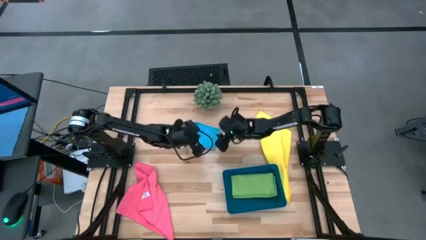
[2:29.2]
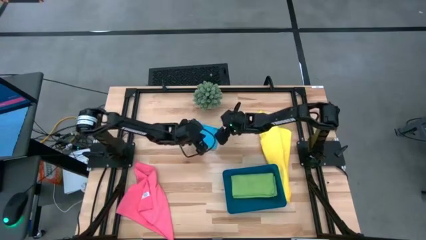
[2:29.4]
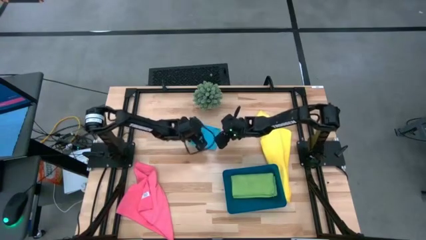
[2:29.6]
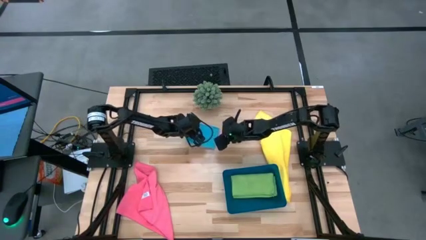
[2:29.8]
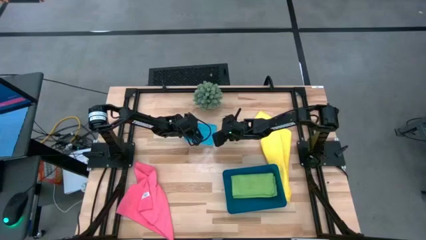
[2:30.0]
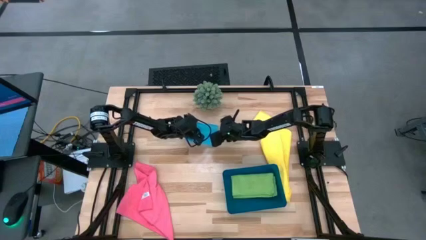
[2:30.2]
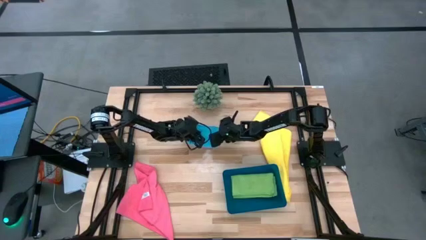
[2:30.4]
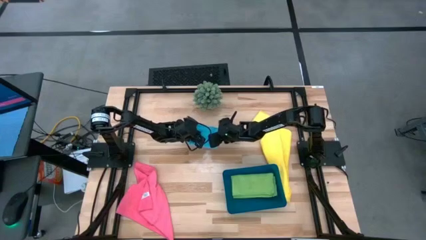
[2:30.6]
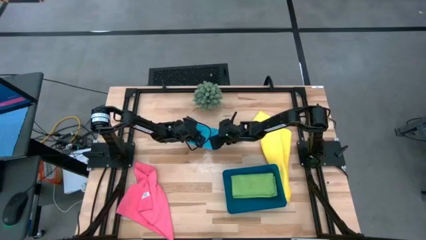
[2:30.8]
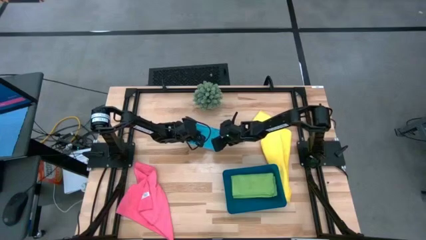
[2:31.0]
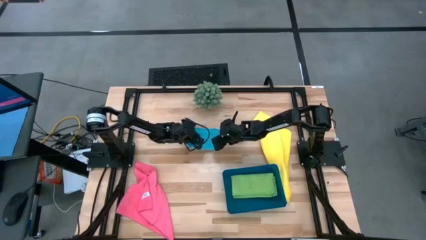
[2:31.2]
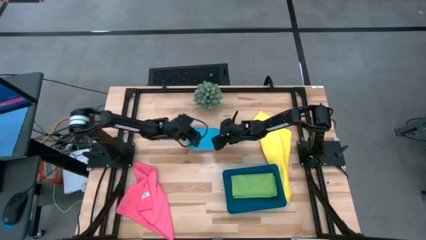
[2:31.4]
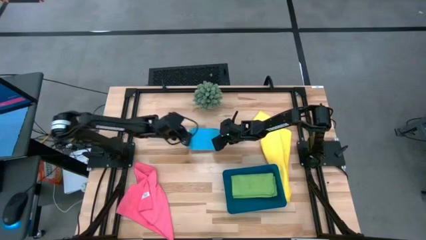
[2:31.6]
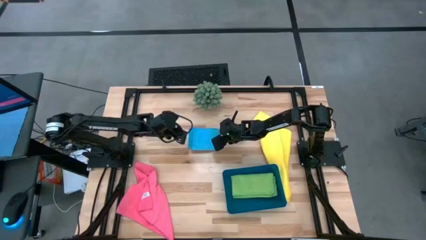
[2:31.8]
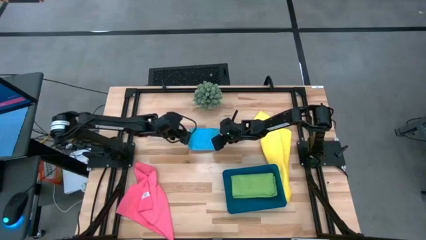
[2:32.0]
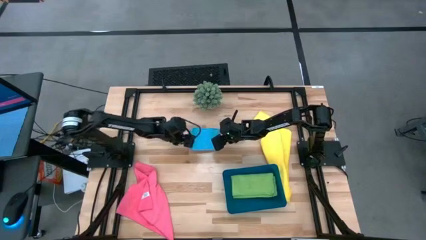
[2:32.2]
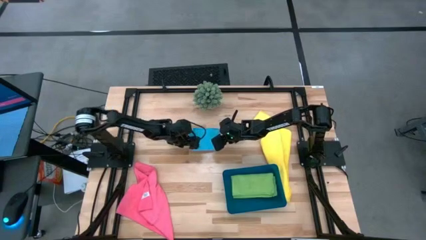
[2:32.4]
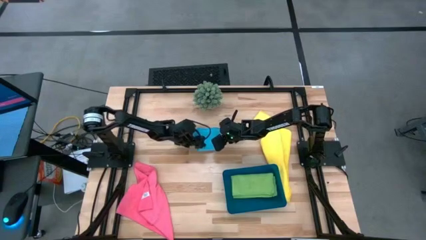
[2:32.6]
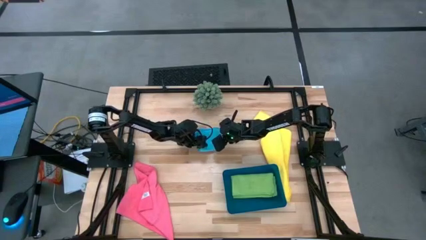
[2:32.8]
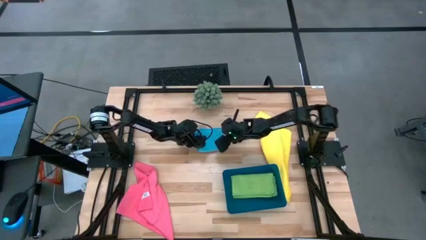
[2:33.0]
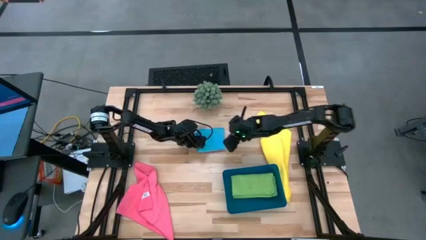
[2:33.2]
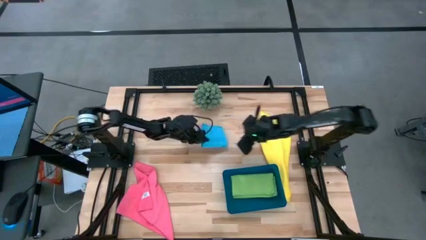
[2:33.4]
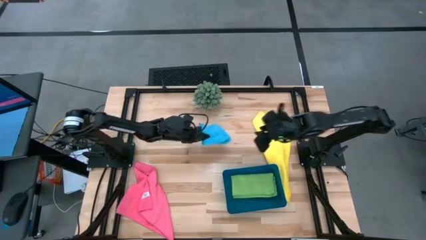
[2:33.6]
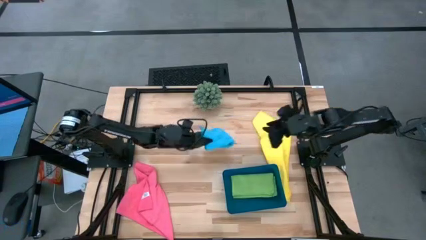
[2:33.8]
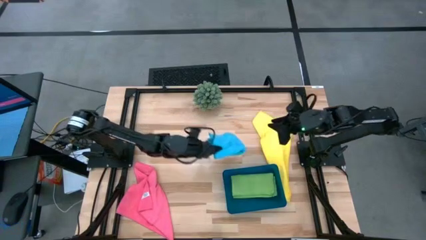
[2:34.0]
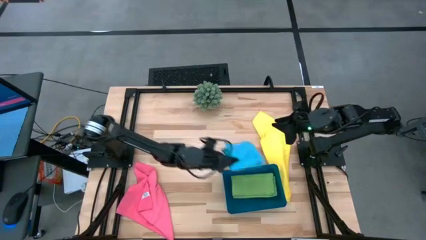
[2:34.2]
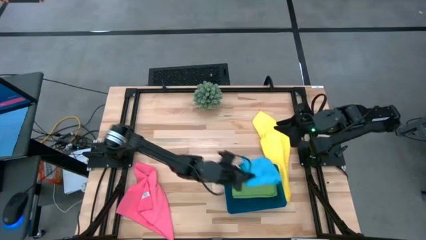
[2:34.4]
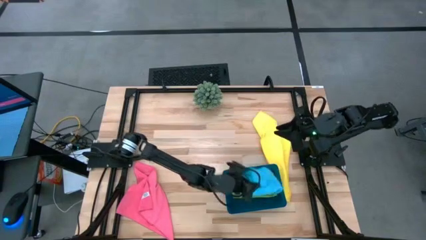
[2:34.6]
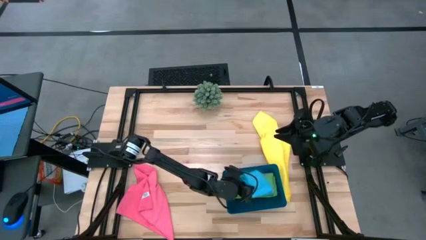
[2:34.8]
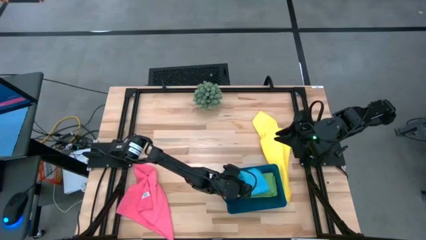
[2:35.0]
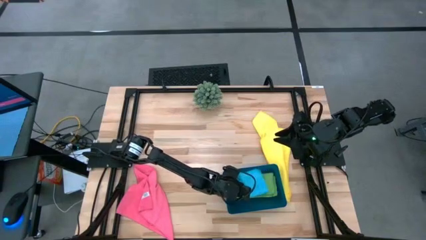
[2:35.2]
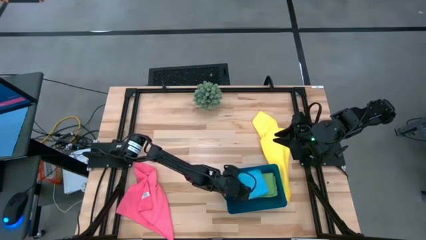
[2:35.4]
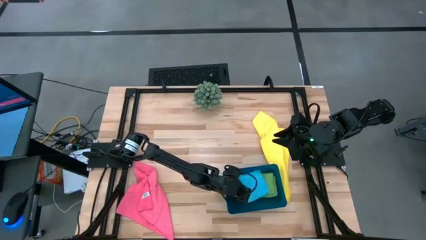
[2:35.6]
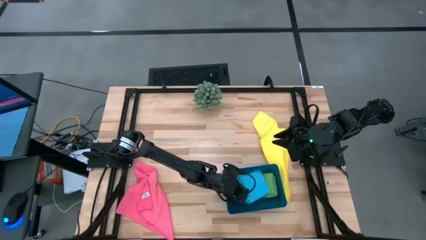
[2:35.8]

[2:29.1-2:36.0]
Task: Fold microfiber towels
Stack the folded blue microfiber cloth into the blue bin

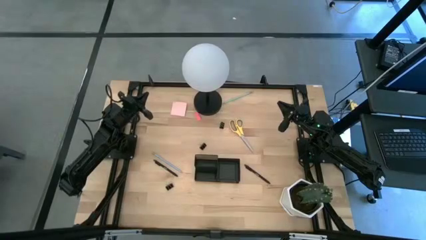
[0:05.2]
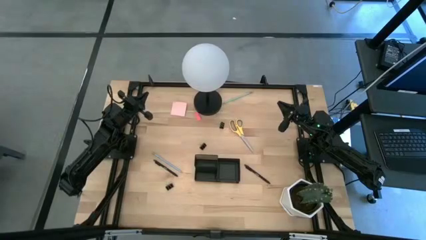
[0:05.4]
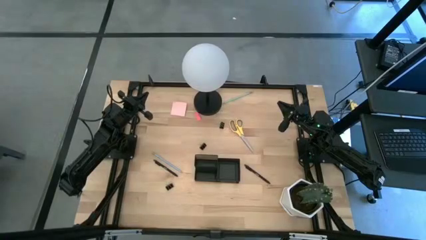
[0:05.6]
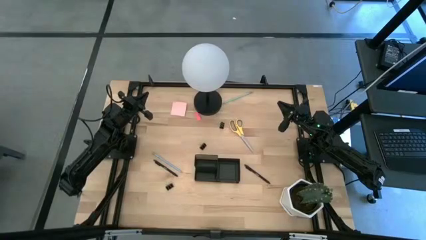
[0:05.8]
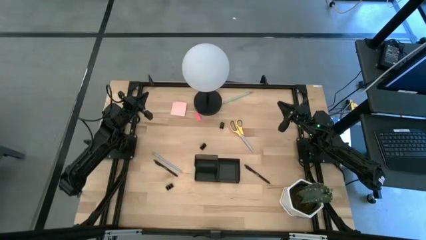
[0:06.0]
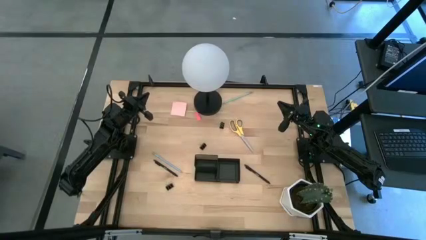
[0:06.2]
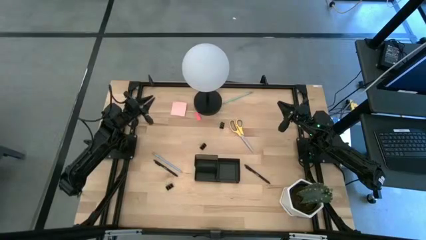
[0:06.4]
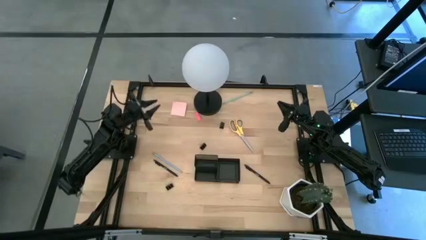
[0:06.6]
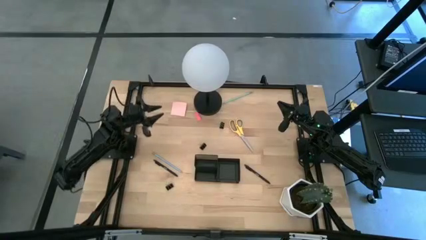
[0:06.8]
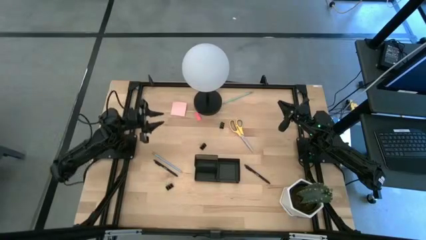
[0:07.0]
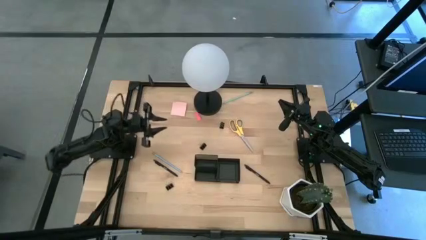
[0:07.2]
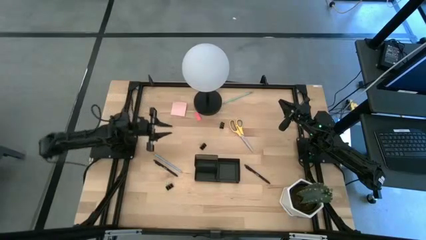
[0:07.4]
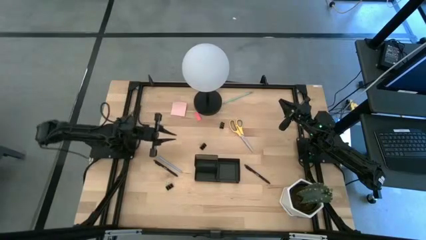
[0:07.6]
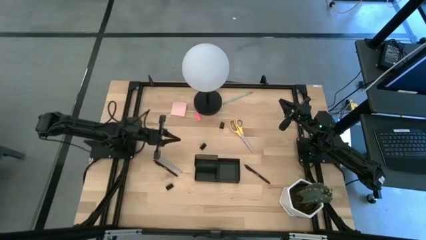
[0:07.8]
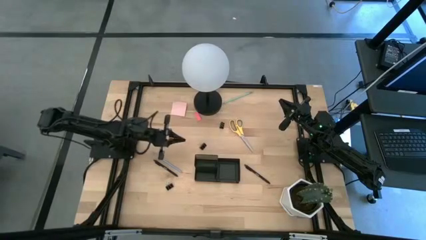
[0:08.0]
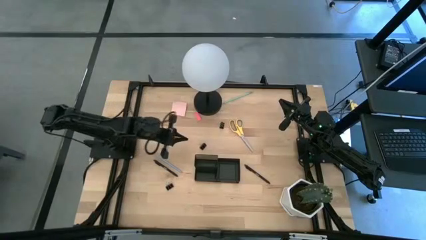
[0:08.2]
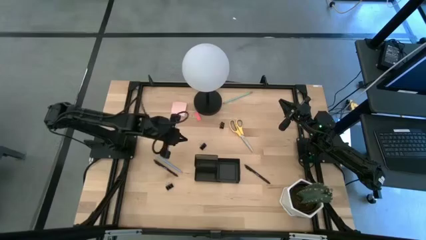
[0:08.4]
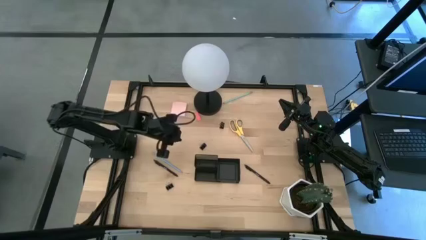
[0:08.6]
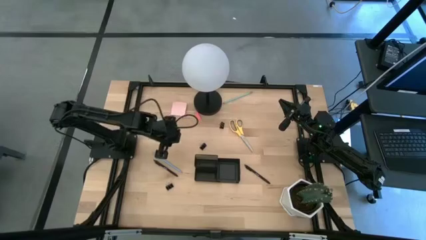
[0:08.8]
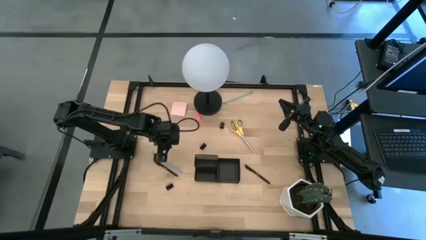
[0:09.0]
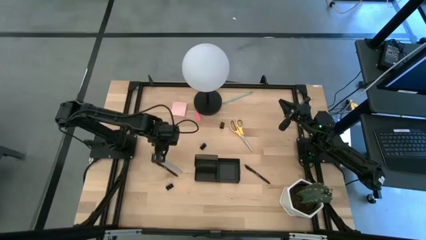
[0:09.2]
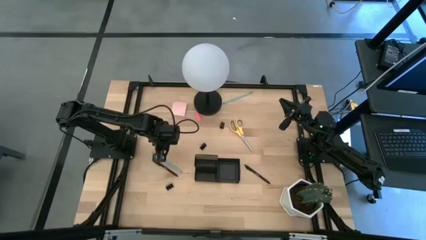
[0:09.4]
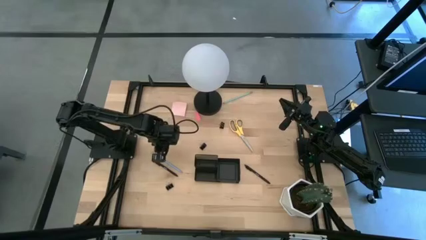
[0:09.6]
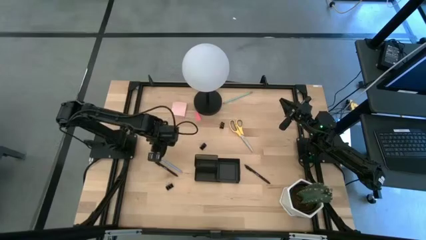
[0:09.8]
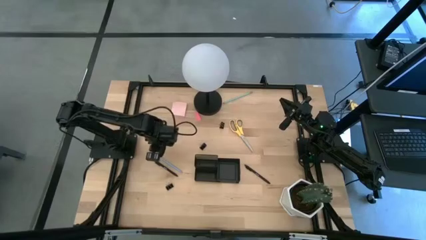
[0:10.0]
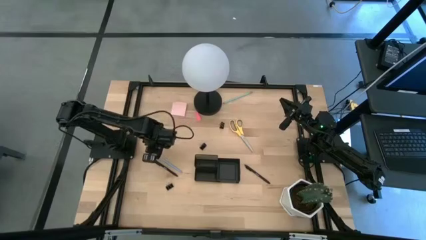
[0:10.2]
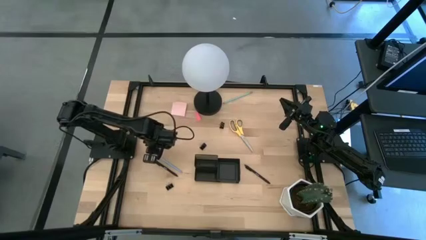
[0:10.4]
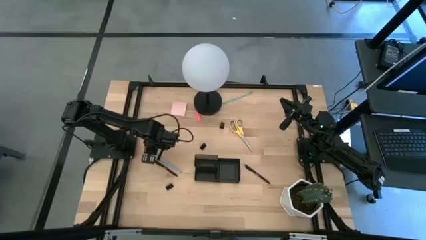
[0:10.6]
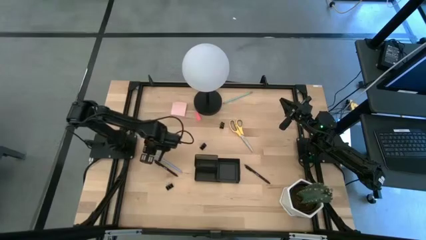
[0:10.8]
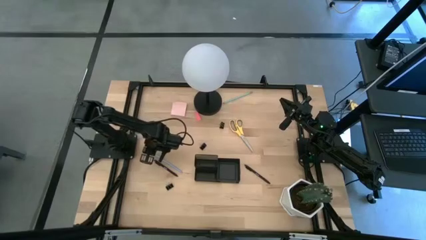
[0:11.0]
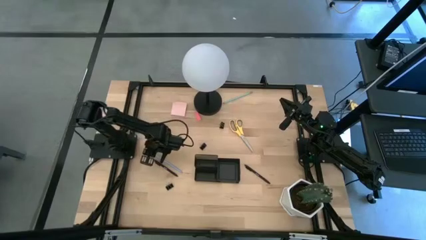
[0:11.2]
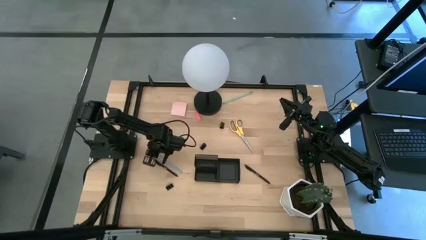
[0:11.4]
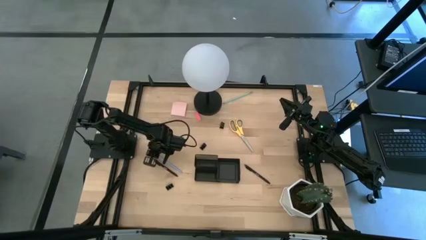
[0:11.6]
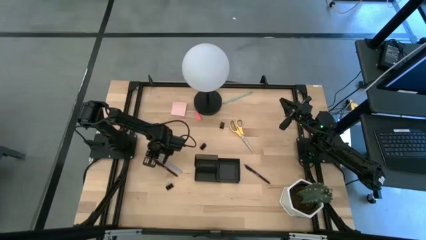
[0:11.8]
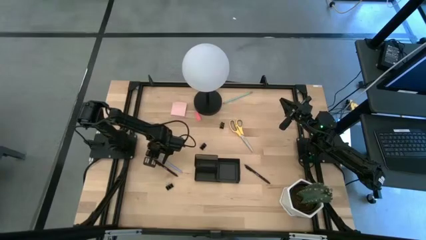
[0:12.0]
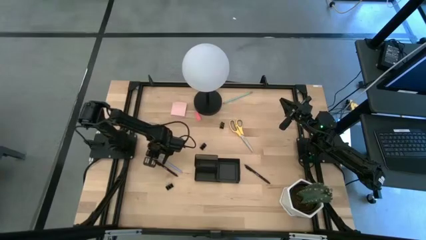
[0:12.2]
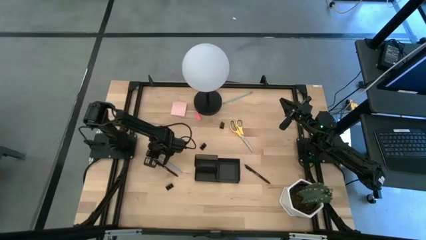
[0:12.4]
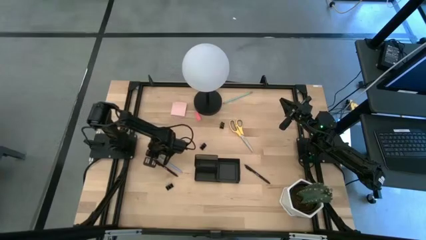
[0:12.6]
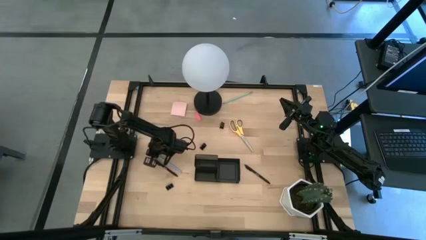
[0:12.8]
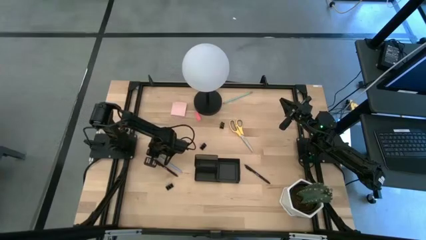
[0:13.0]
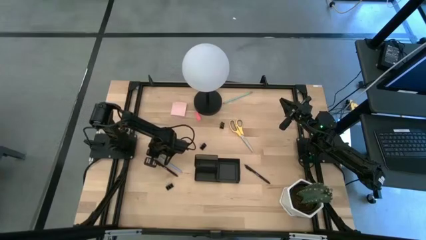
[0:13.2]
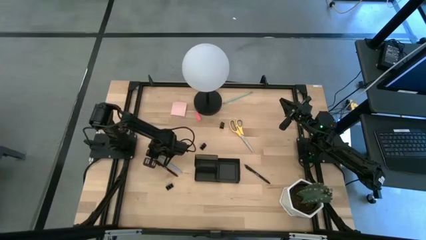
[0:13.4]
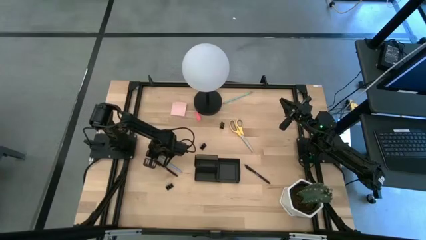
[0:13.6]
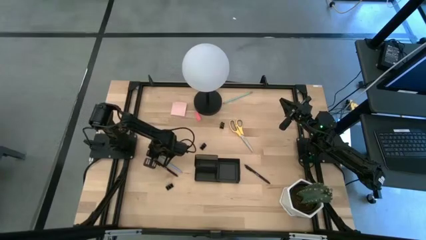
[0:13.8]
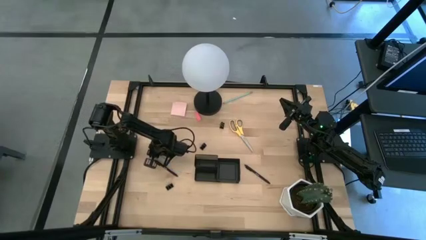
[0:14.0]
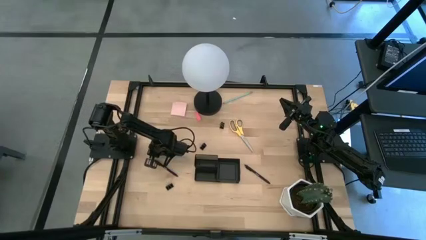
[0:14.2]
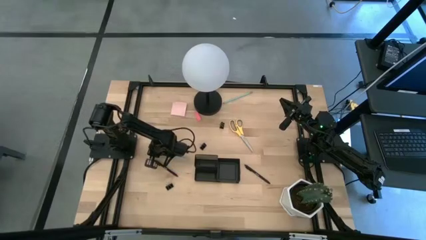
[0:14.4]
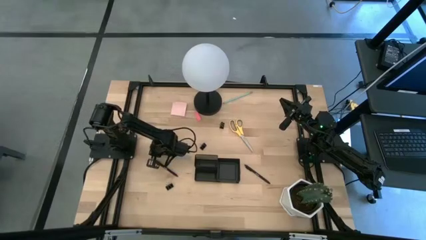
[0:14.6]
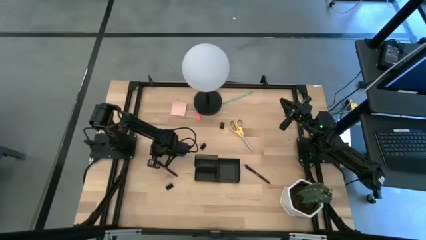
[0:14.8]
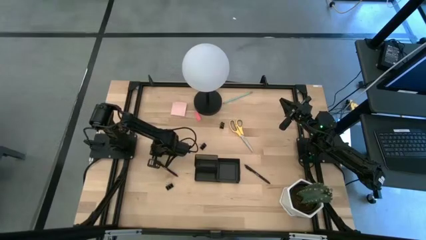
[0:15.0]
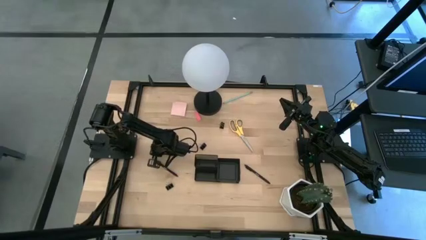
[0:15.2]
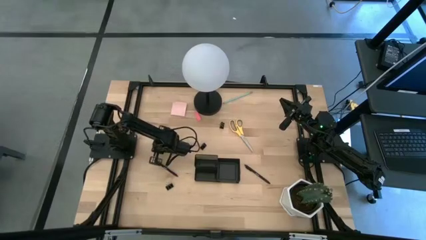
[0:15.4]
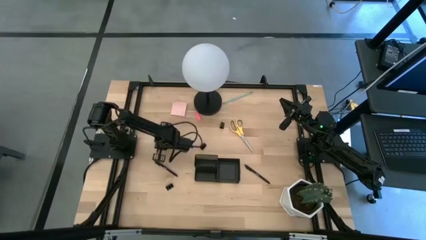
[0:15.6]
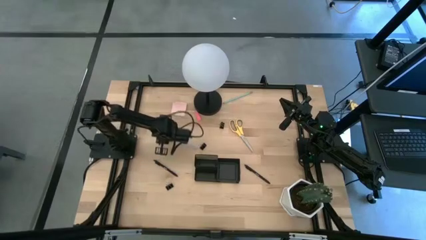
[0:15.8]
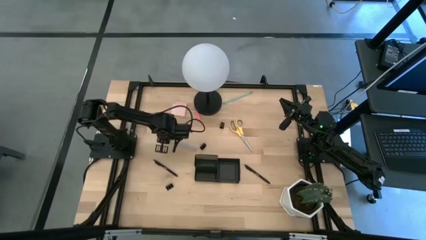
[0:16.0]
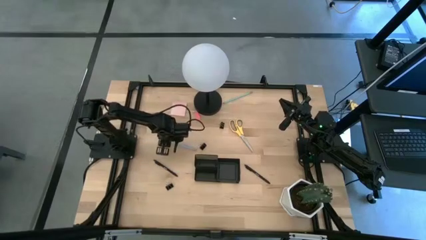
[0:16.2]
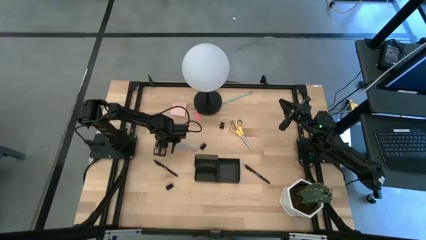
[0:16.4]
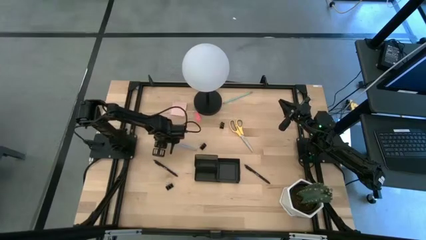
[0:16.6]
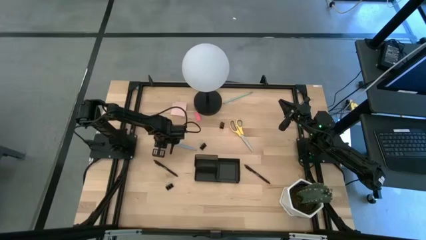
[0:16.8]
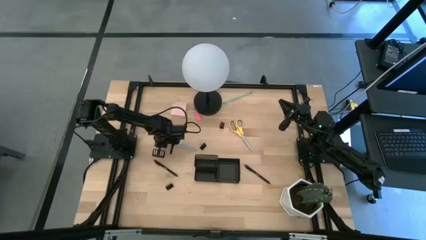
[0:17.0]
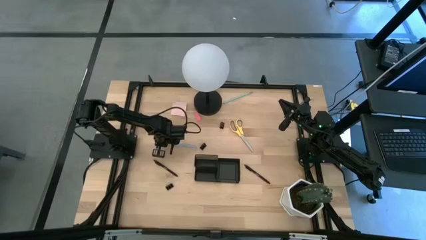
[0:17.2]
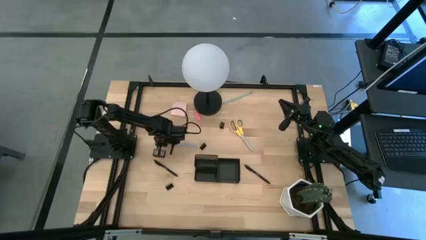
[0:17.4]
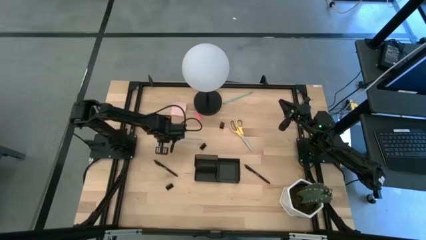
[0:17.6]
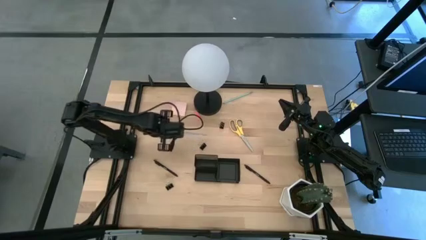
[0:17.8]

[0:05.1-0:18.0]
Task: Pick and place office supplies into organizer
Put the blue pencil into the black desk organizer
